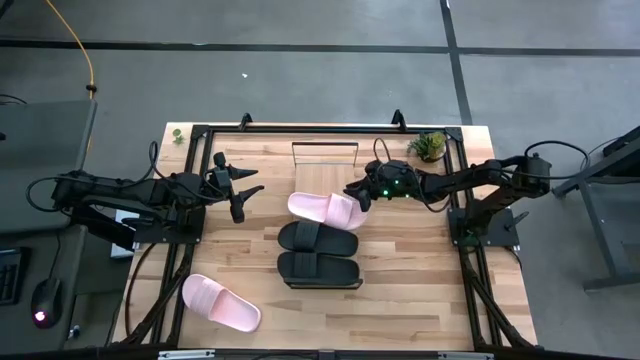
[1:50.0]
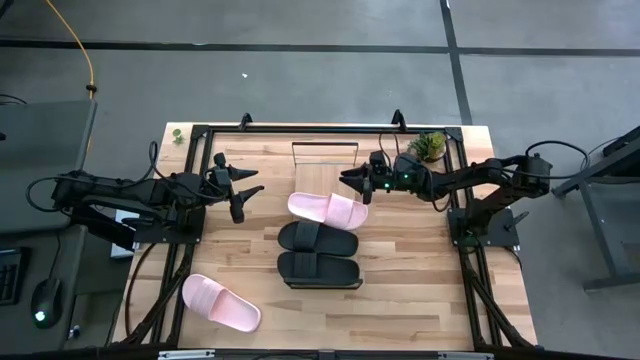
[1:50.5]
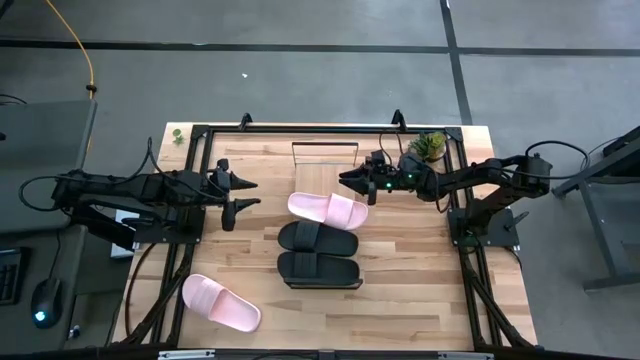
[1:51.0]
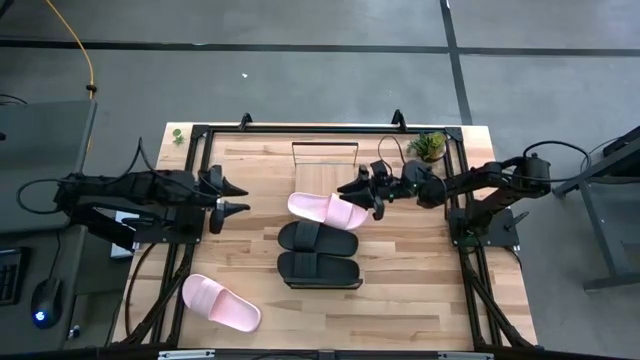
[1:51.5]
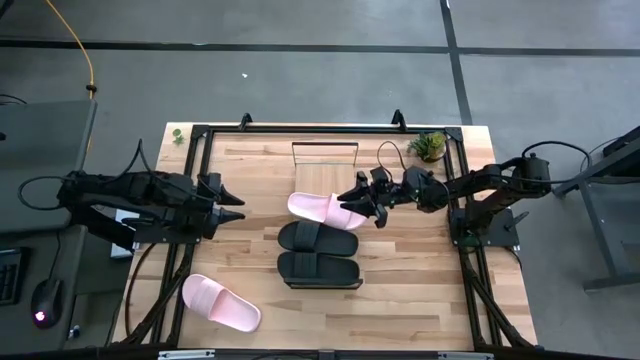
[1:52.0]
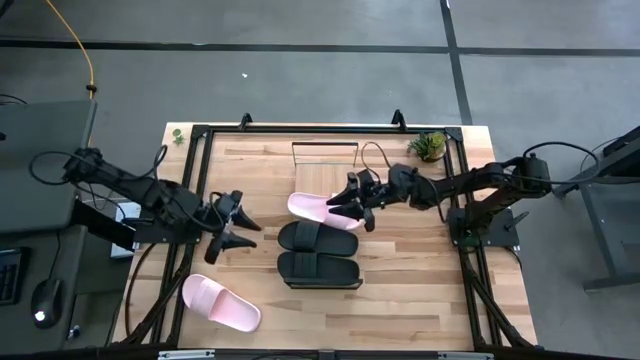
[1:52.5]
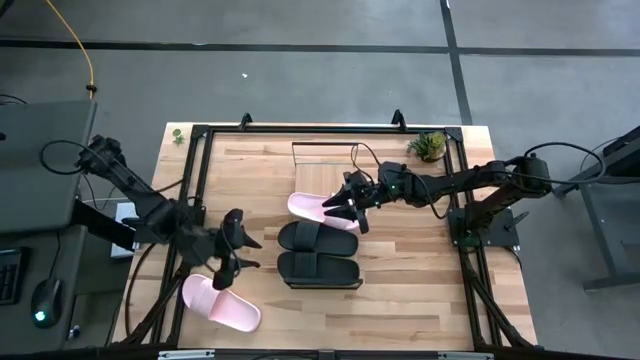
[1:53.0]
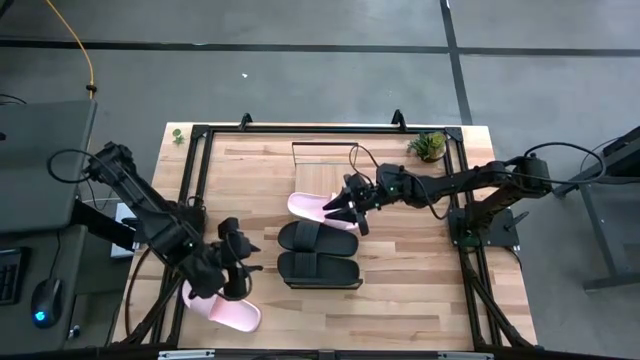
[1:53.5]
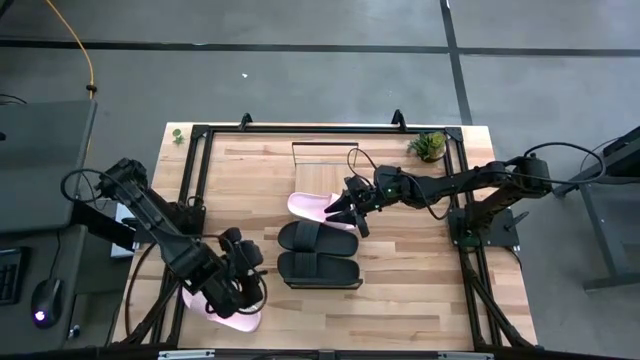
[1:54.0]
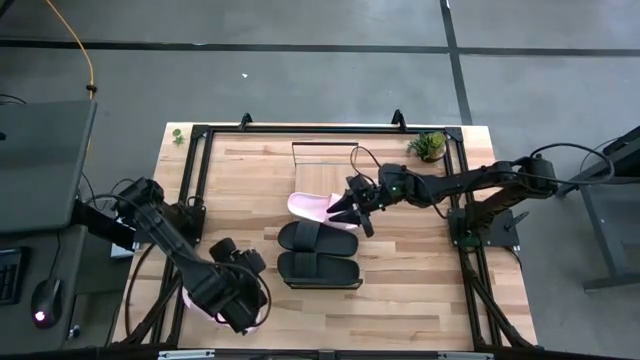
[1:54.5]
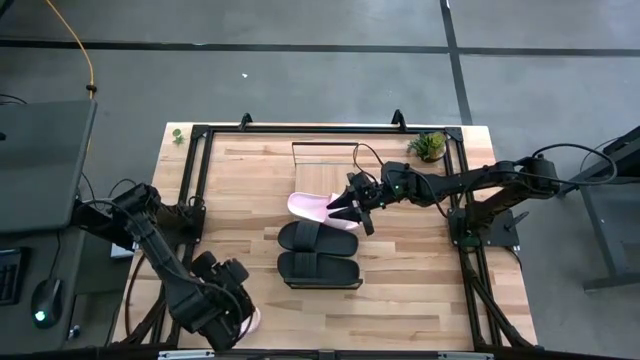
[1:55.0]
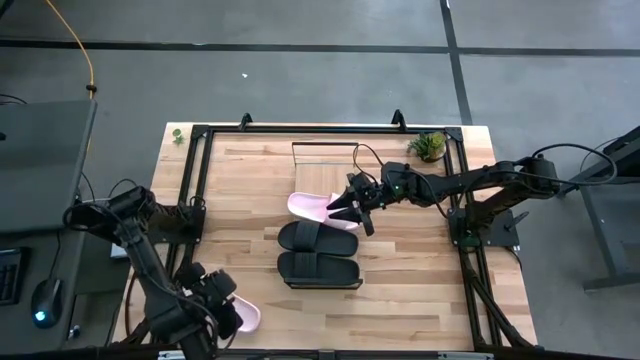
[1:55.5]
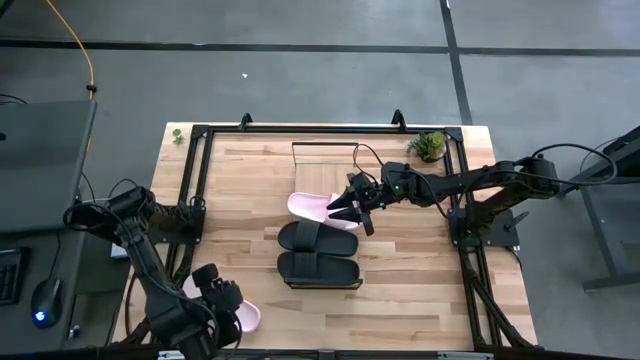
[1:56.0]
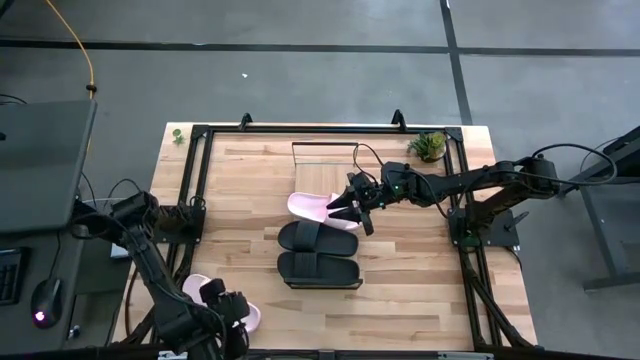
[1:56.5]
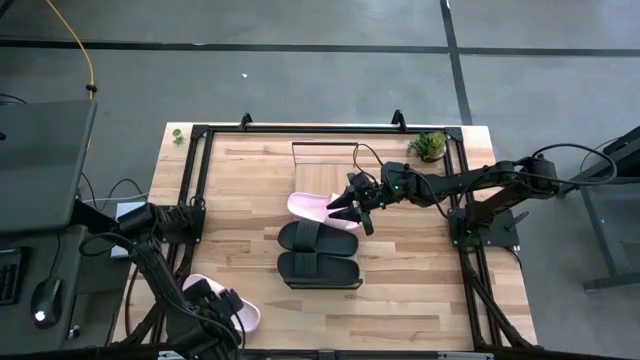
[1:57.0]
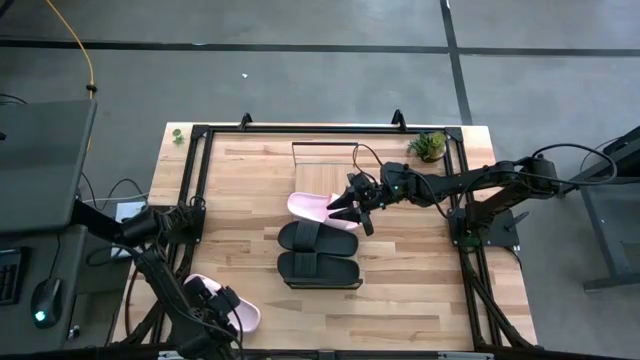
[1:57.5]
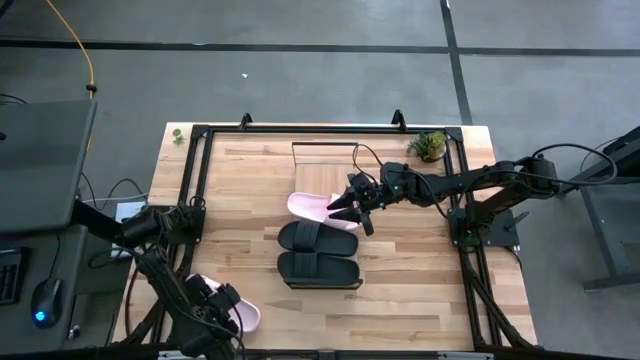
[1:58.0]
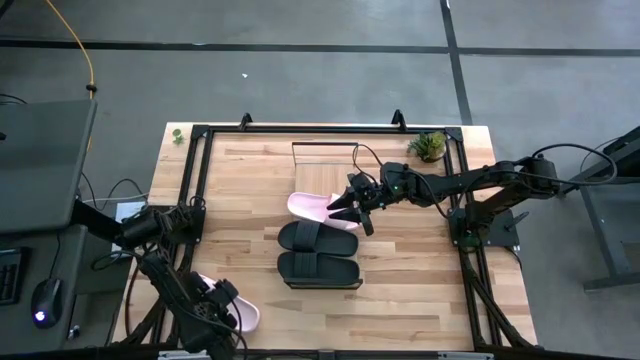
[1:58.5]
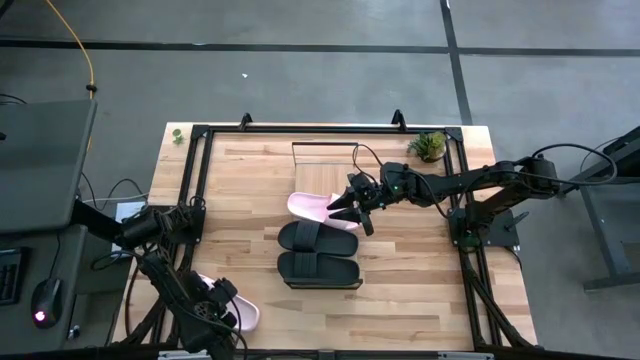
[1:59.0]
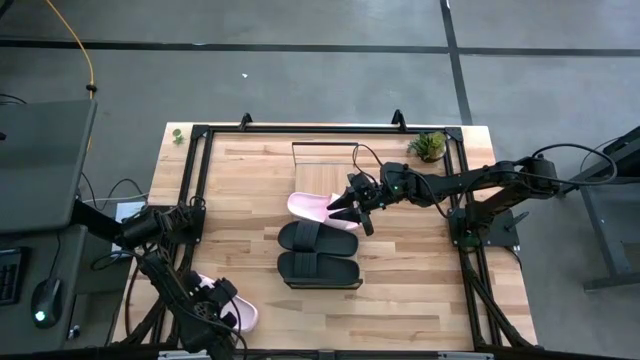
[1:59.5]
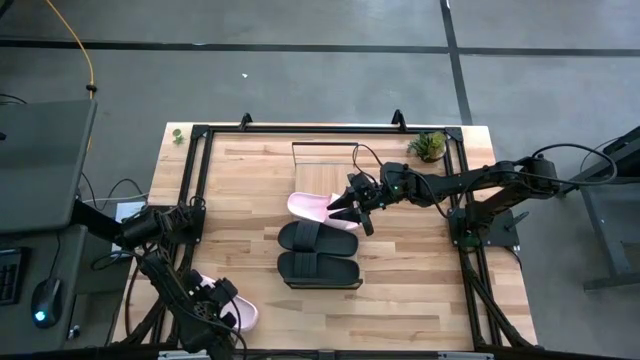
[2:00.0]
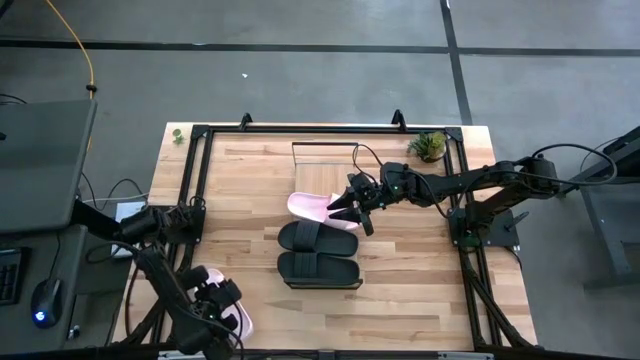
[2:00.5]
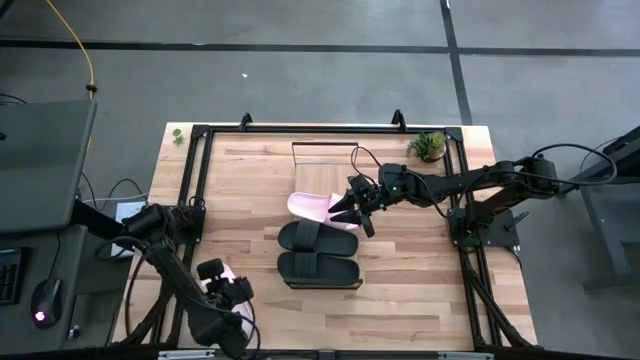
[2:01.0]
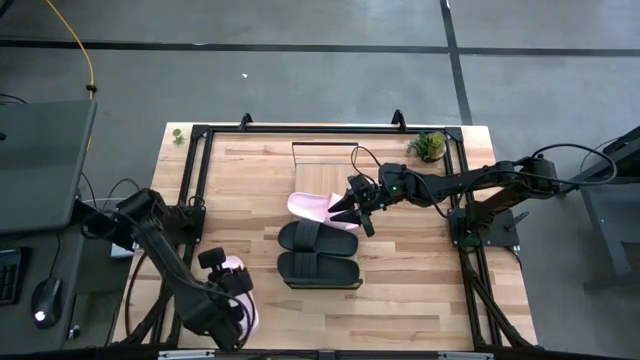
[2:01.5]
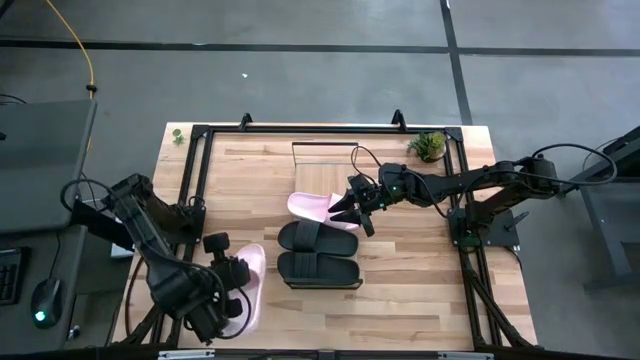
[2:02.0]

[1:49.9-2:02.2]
Task: Pick and place slides into the shelf
Put the pink slipper on the shelf

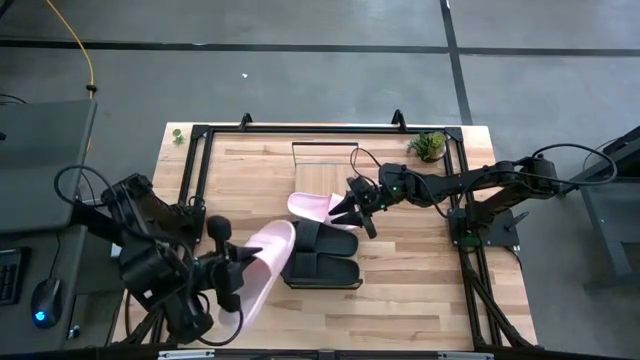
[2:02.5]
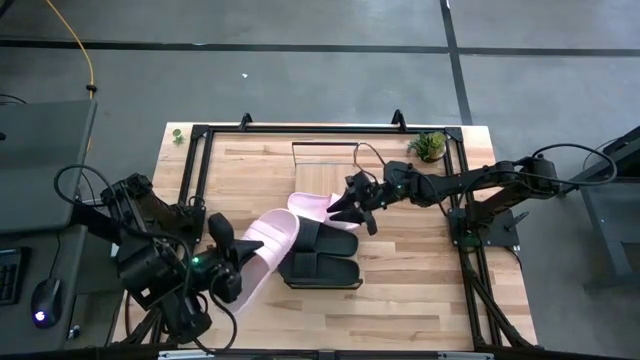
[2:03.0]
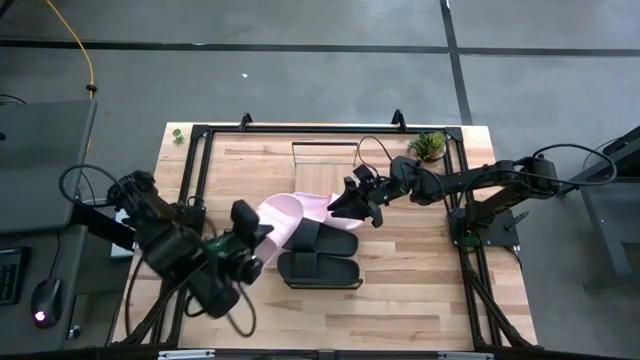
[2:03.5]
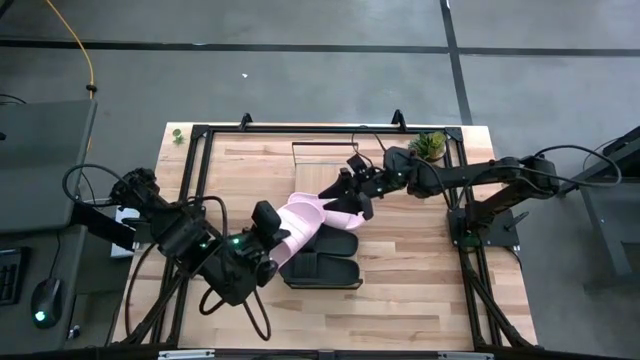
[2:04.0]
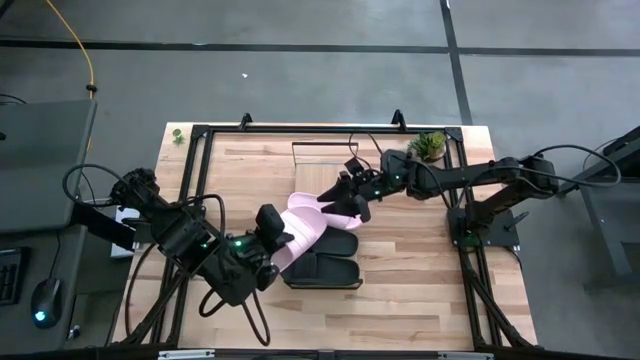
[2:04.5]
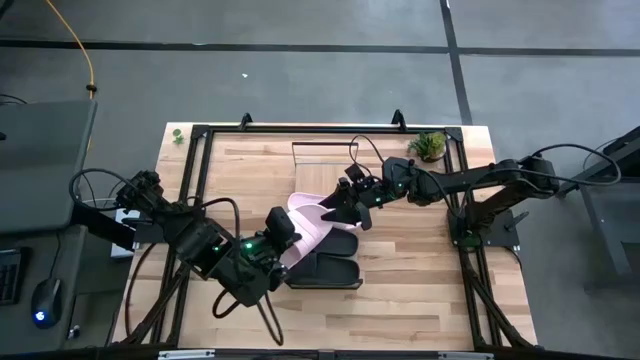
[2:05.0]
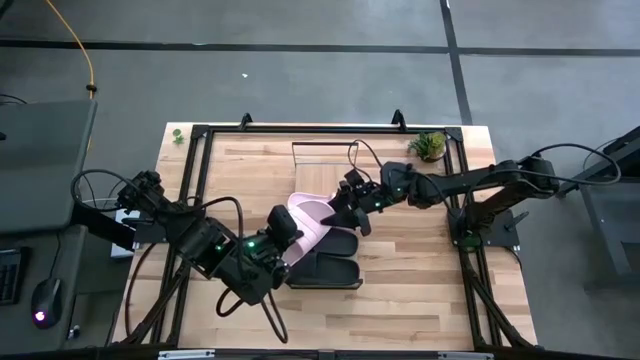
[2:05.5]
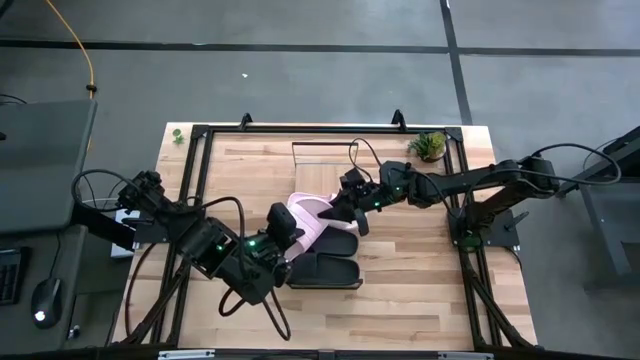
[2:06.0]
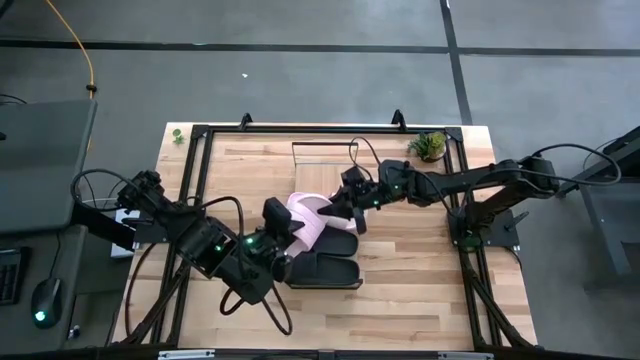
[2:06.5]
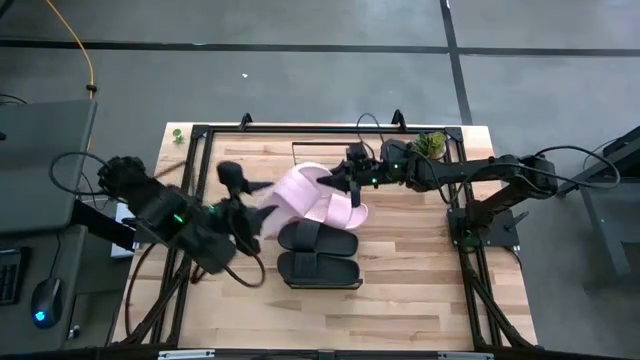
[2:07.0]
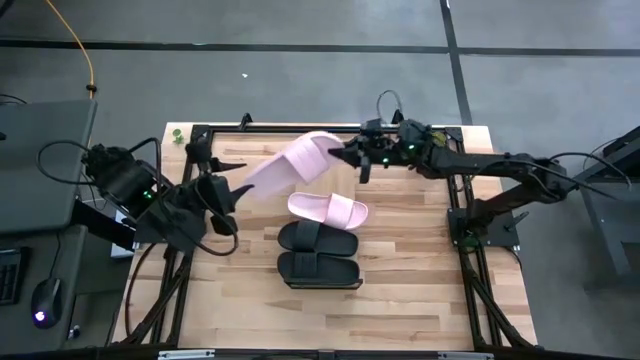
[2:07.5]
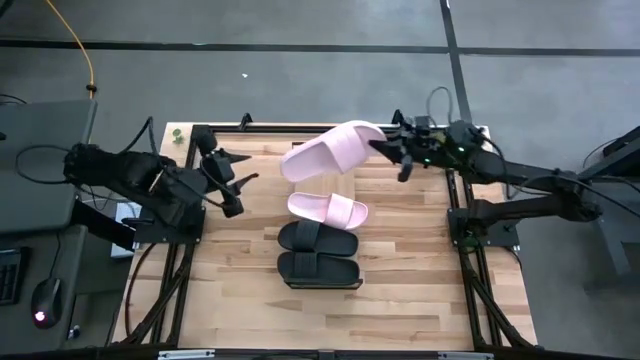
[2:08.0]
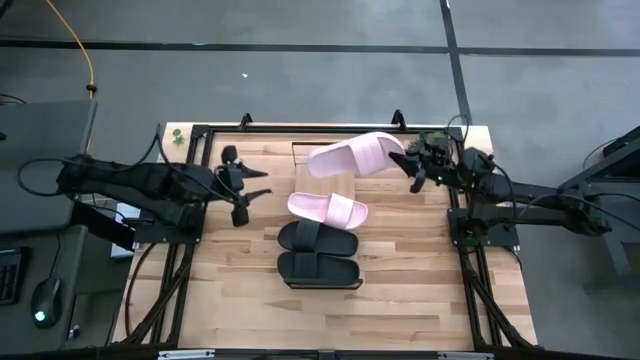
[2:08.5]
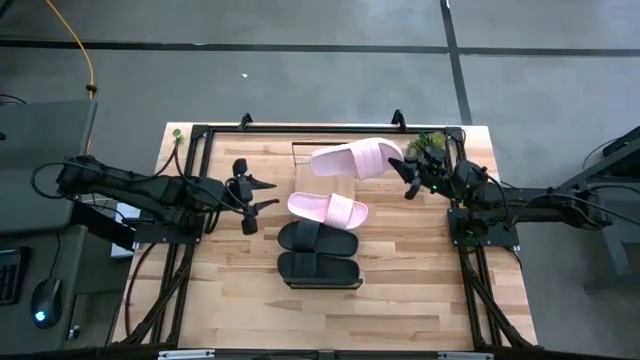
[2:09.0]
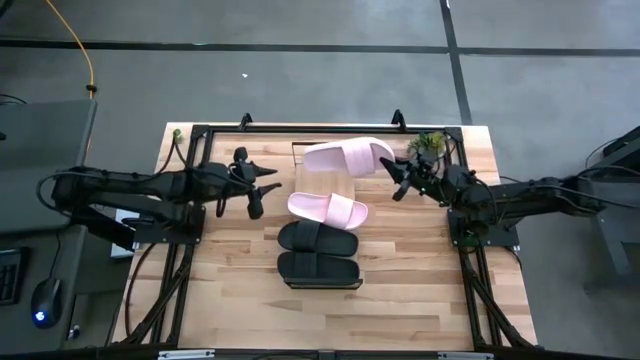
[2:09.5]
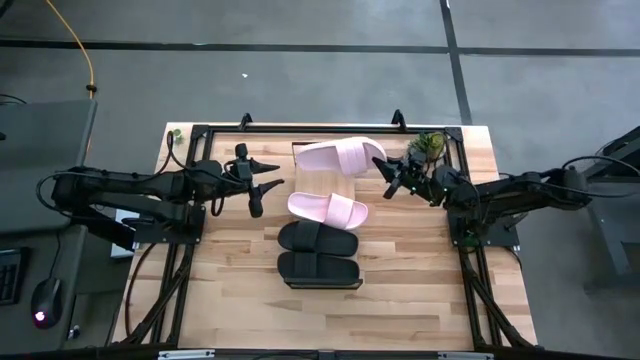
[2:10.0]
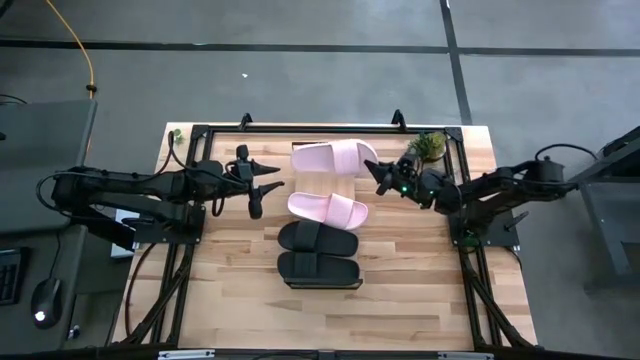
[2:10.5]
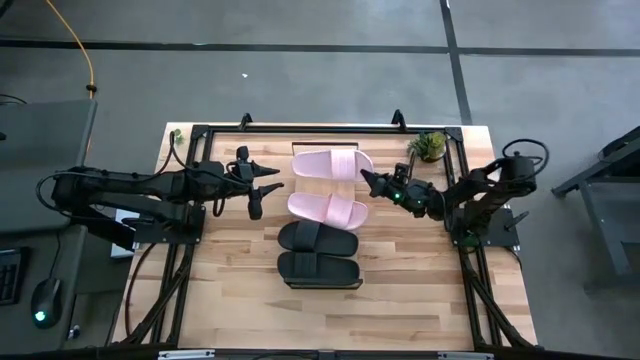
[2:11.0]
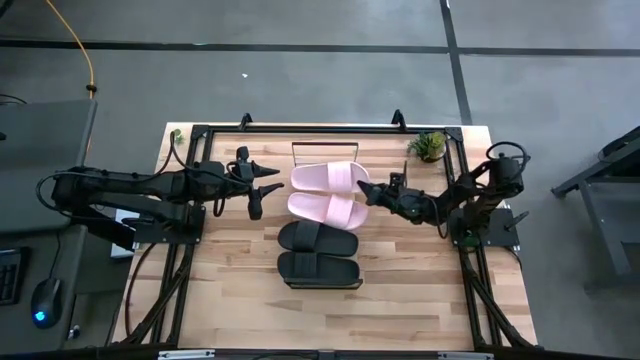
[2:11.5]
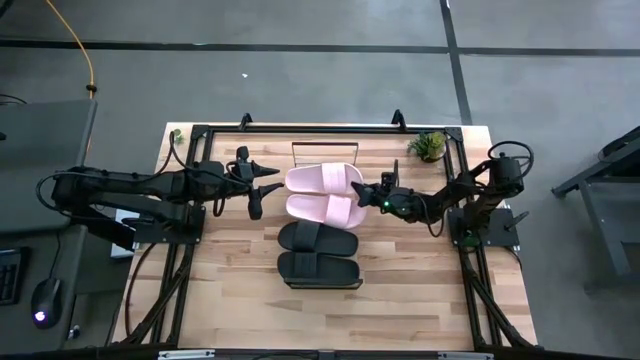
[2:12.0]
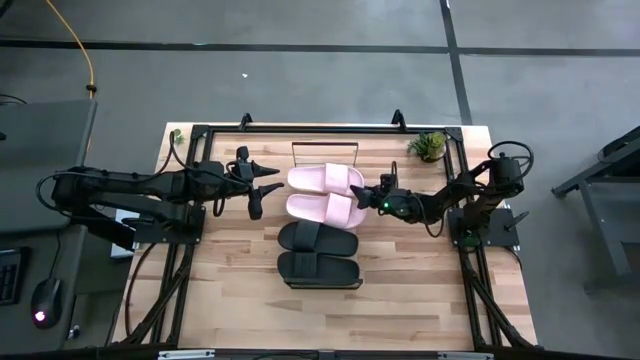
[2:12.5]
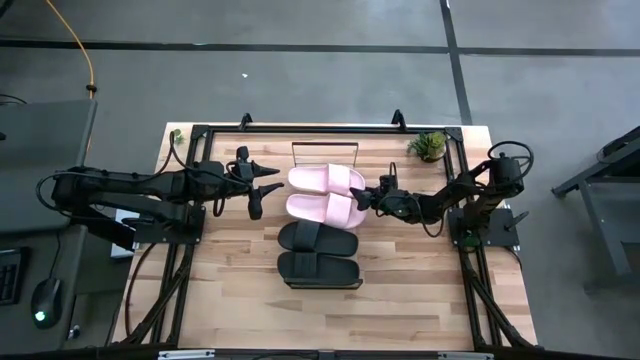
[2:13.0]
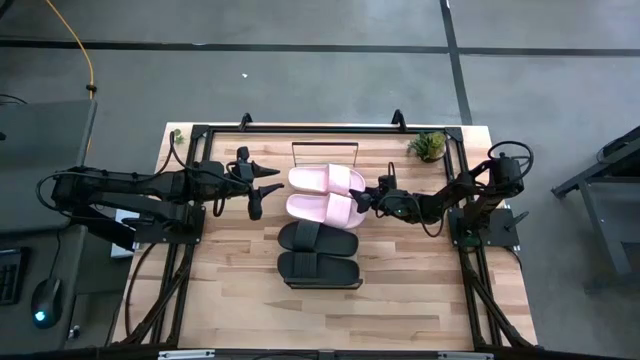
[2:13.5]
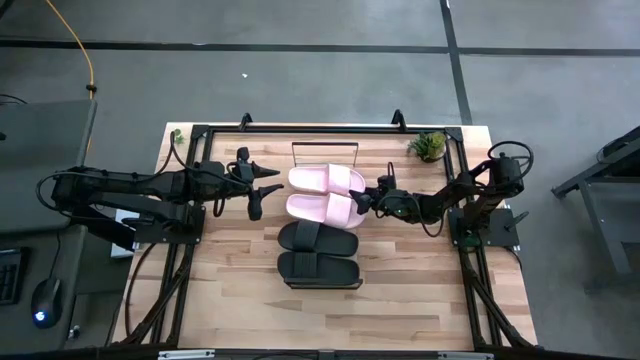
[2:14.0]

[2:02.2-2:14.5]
Put the pink slipper on the shelf
